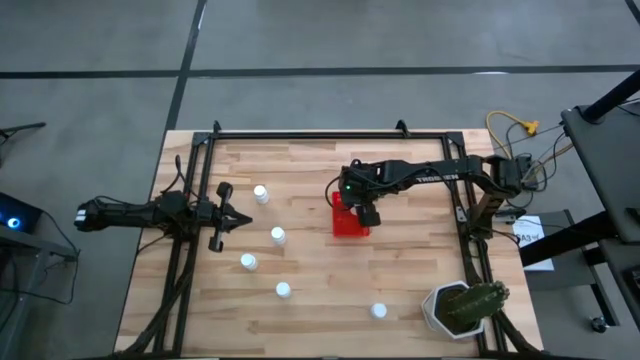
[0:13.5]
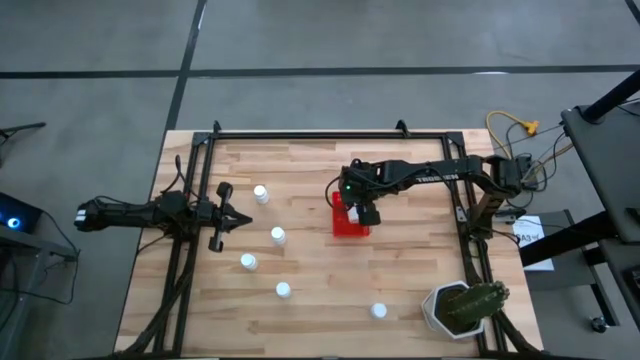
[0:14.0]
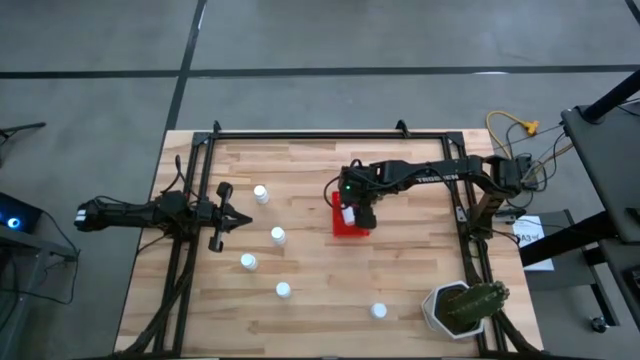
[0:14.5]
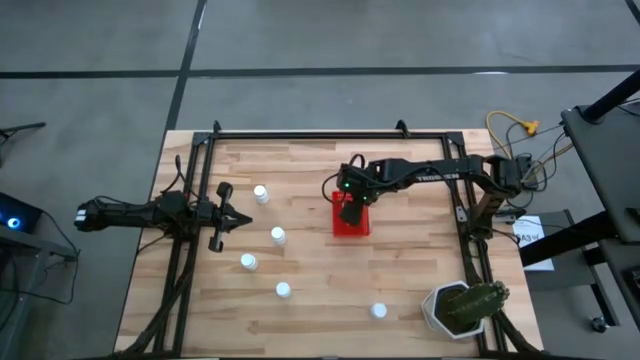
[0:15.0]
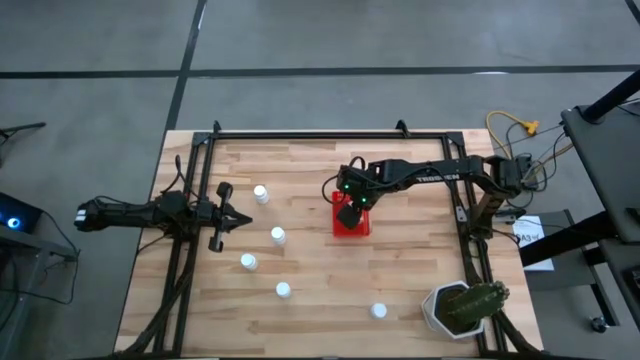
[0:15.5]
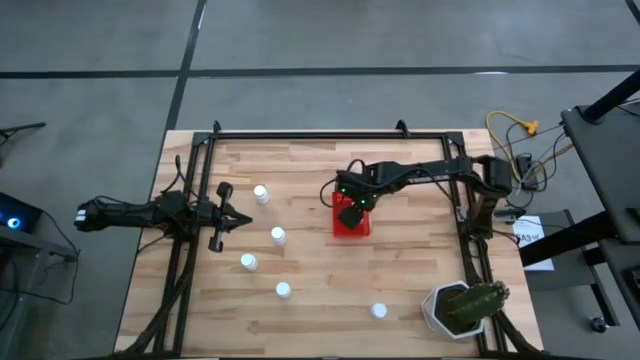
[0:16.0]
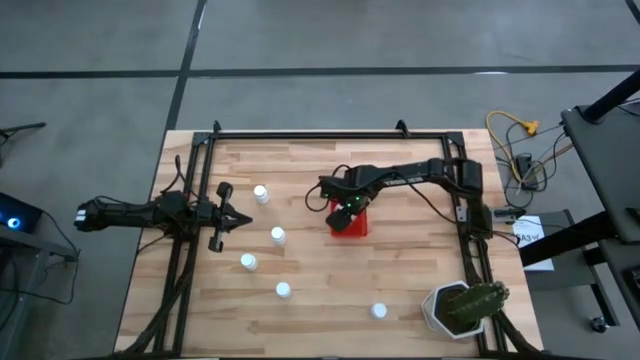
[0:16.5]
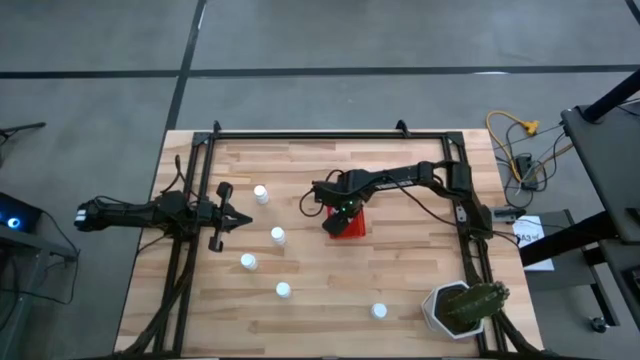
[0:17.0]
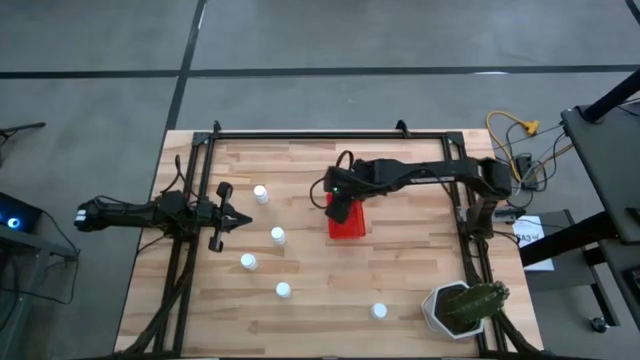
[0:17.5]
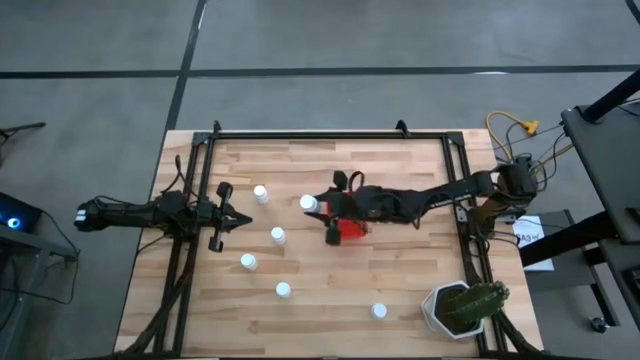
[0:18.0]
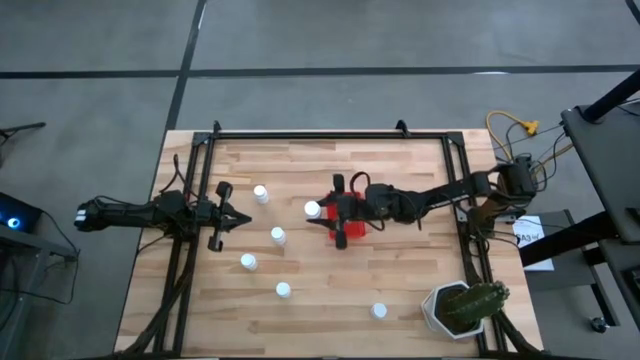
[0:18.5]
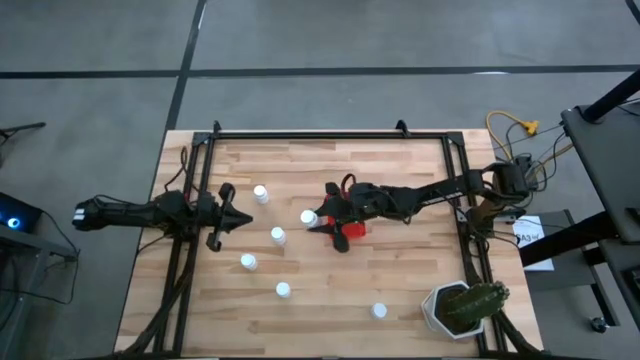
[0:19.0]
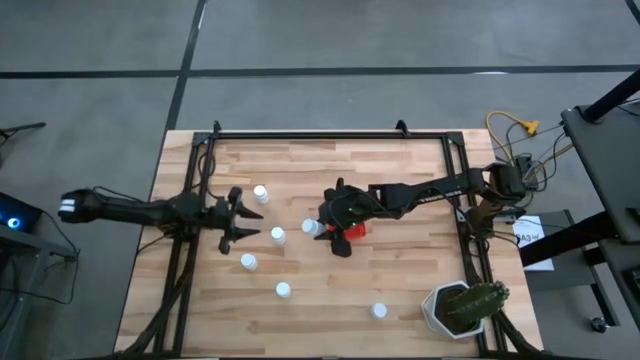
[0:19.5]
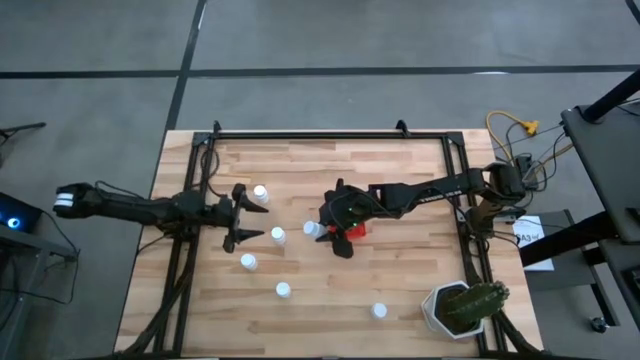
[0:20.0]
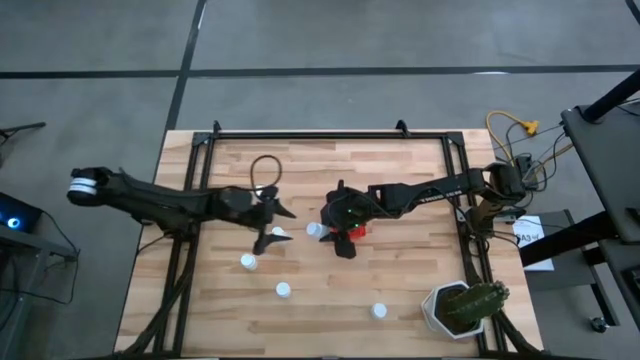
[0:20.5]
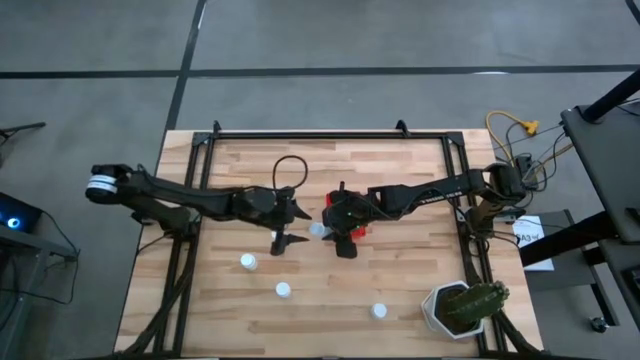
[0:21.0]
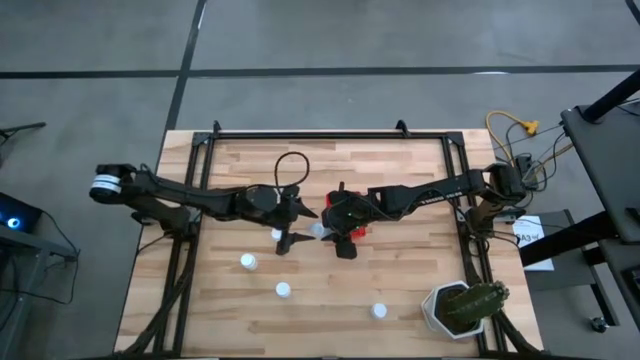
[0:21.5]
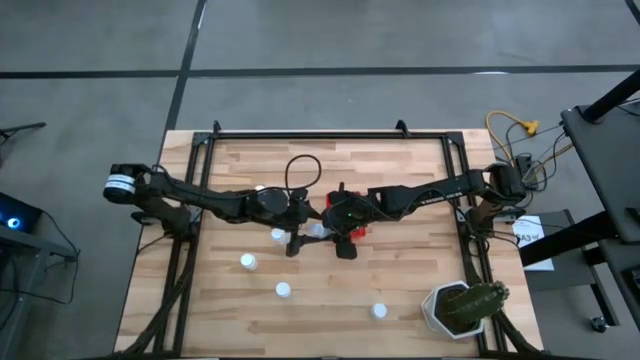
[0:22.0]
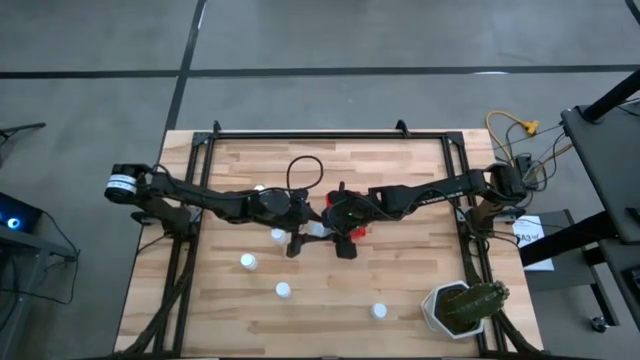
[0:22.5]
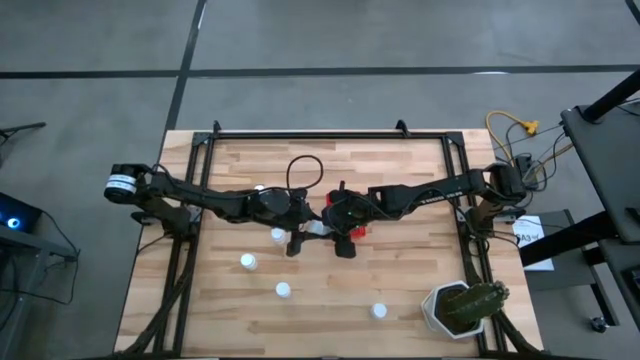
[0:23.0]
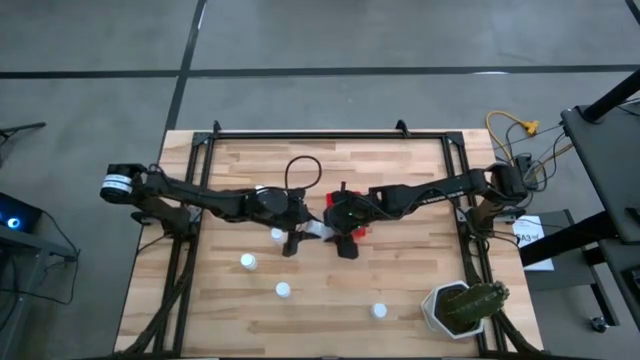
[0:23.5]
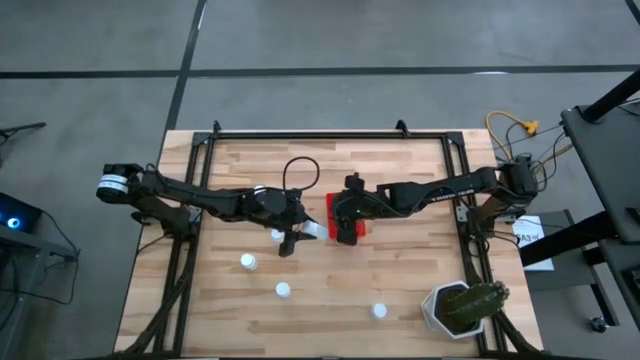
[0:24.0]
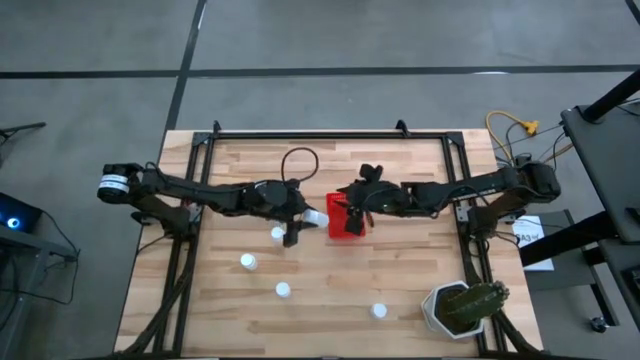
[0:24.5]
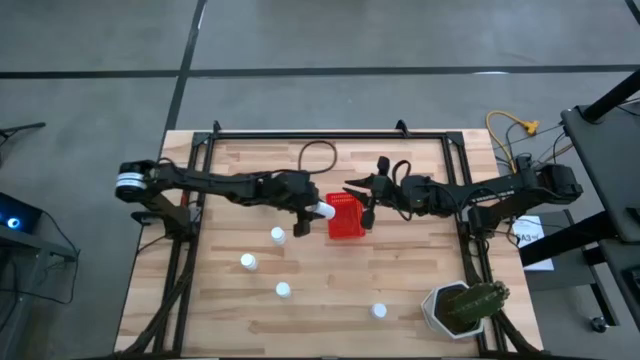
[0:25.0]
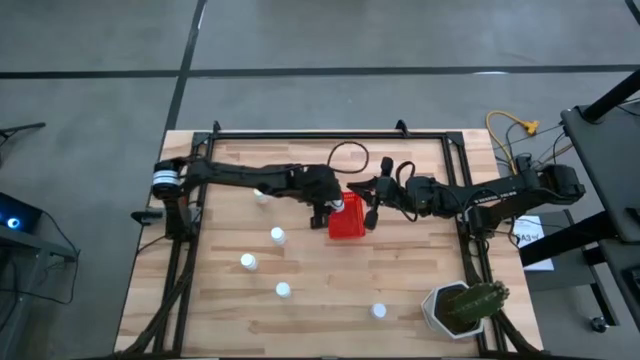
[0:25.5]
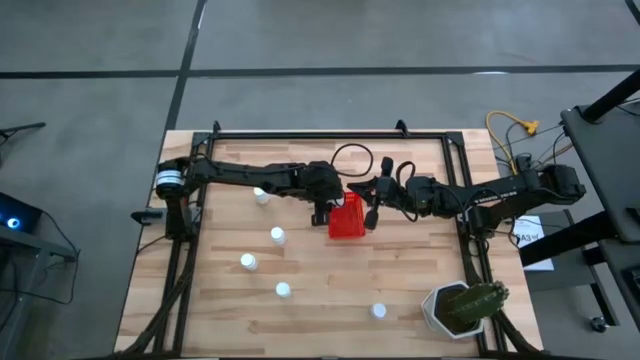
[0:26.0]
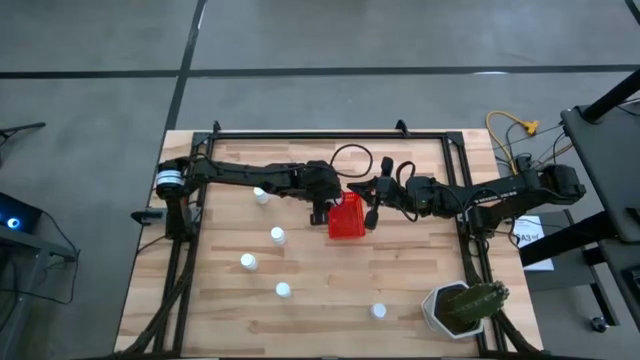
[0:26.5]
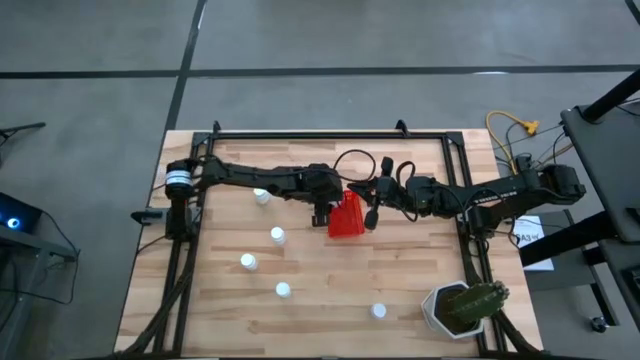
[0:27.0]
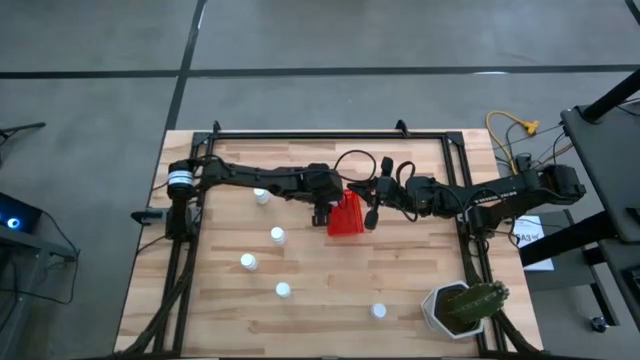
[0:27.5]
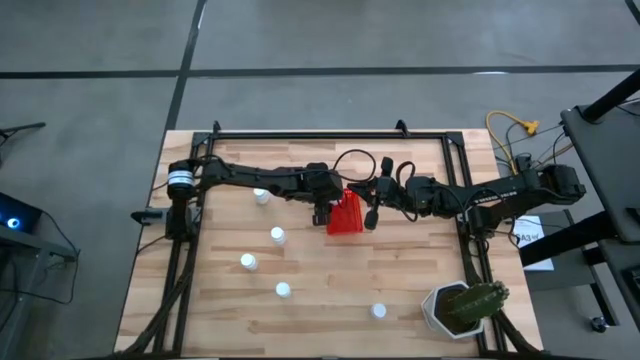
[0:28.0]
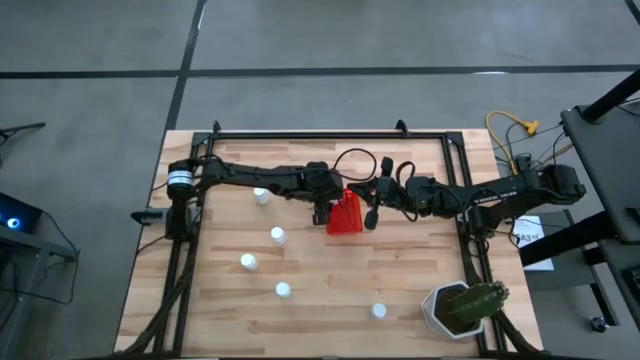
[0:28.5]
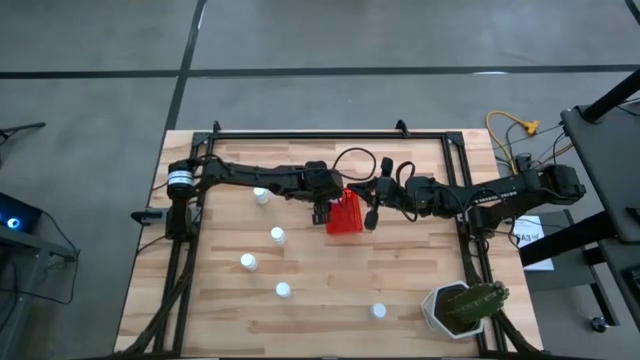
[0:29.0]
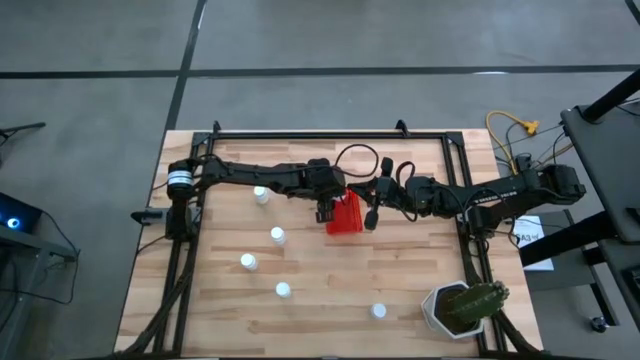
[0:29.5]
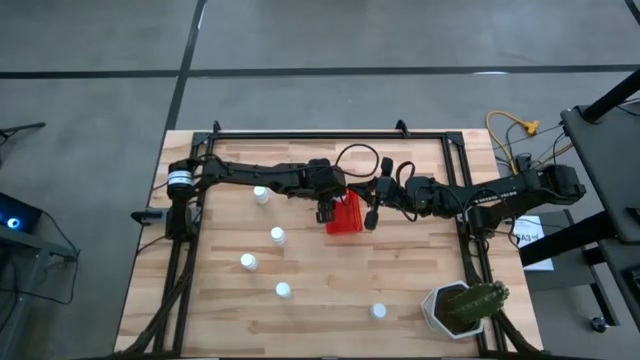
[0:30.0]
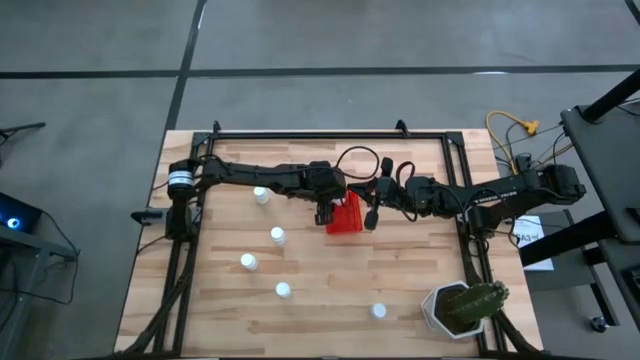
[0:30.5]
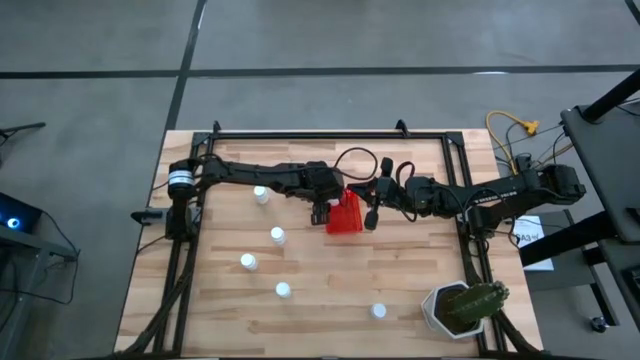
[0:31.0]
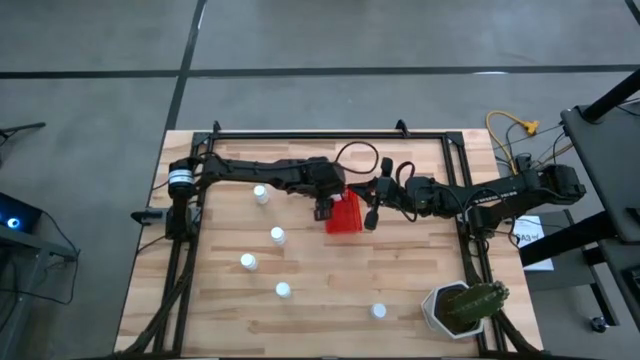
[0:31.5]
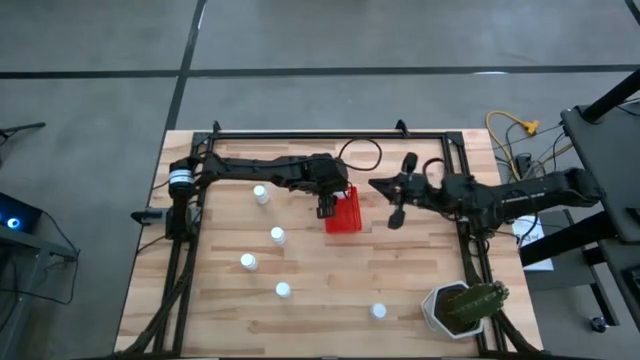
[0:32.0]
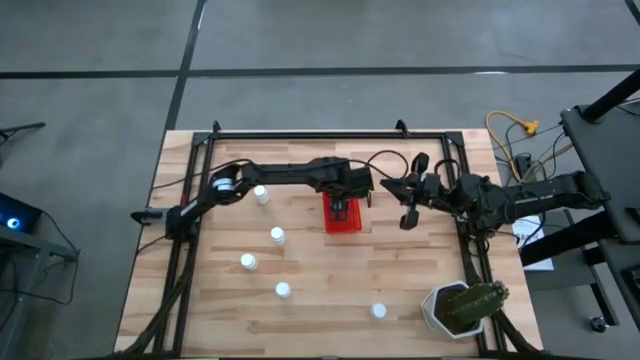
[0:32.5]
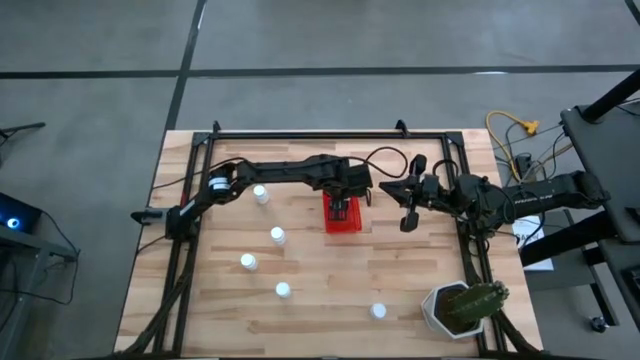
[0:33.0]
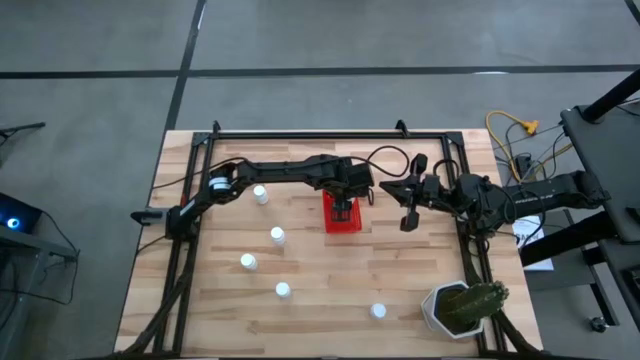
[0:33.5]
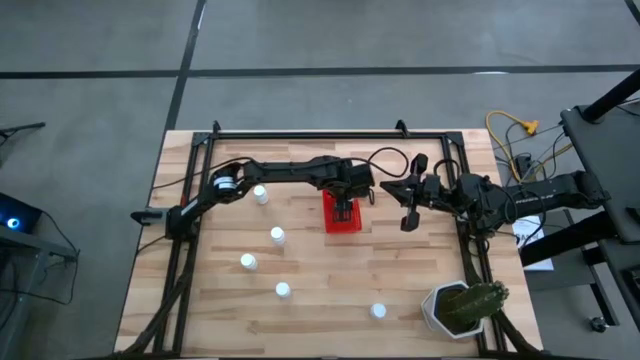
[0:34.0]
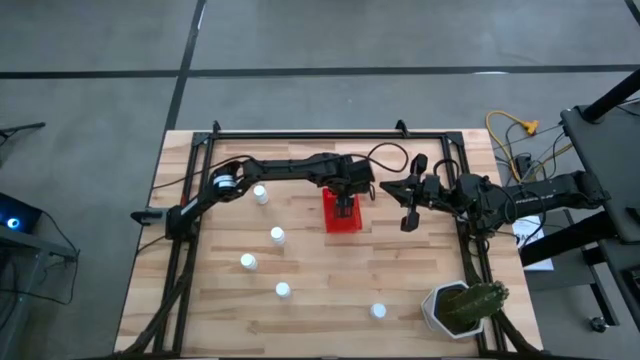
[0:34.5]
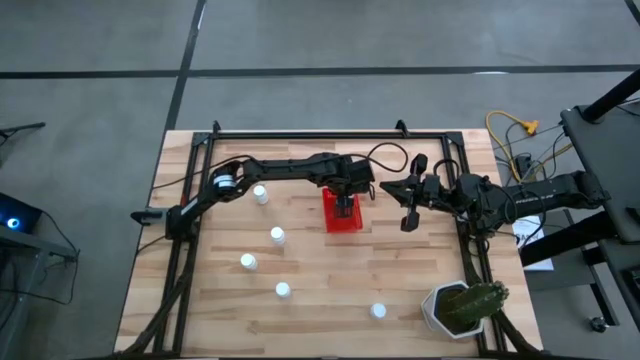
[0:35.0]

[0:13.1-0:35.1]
Task: Pick and place pill bottles into a basket
Put the middle right white medicine bottle into the red bin
